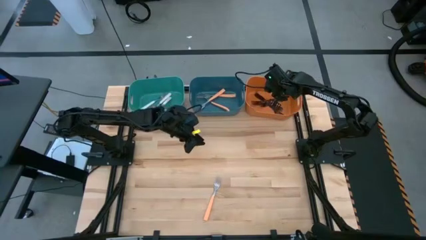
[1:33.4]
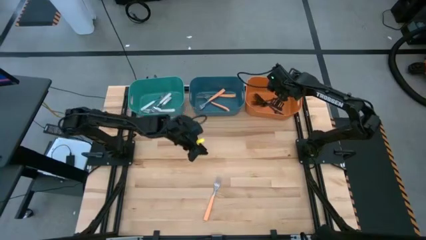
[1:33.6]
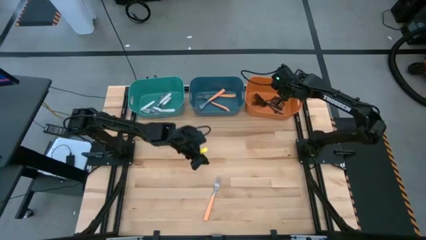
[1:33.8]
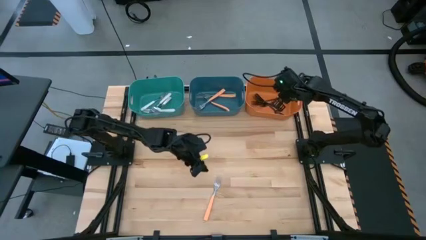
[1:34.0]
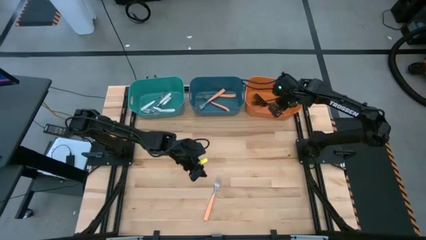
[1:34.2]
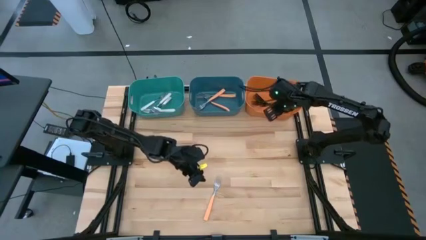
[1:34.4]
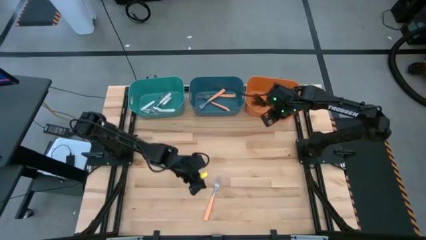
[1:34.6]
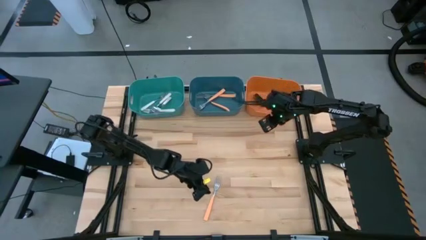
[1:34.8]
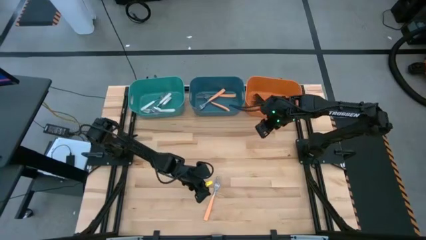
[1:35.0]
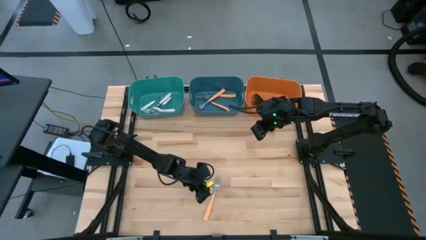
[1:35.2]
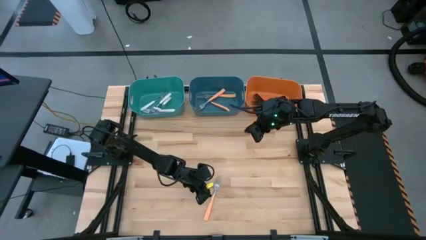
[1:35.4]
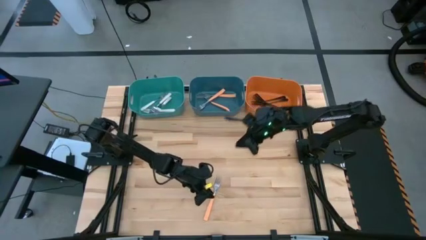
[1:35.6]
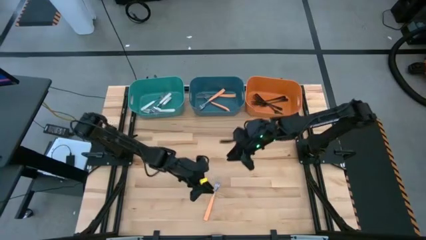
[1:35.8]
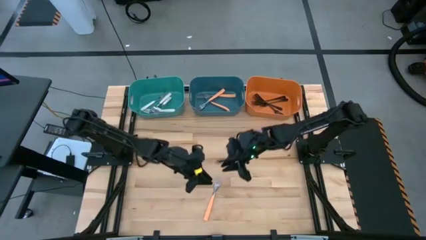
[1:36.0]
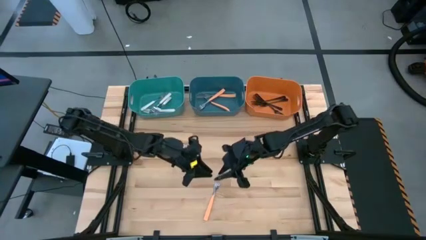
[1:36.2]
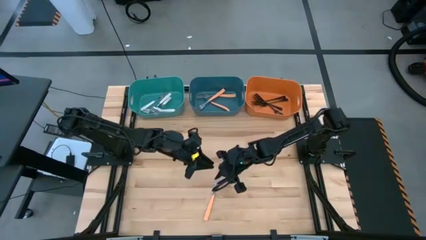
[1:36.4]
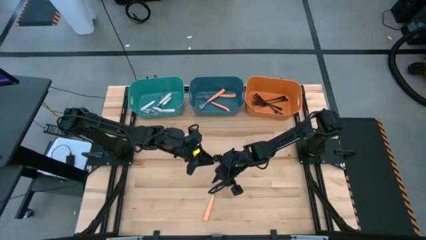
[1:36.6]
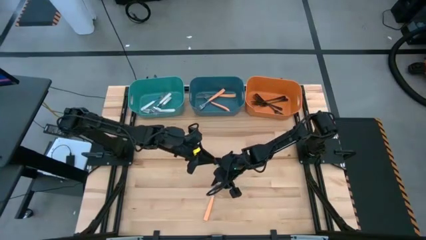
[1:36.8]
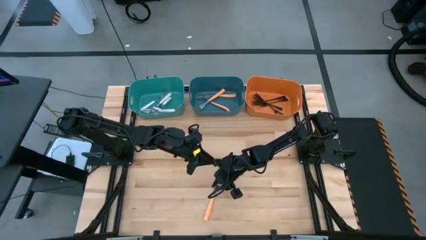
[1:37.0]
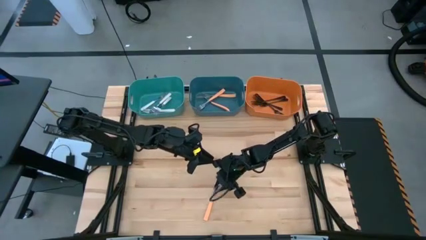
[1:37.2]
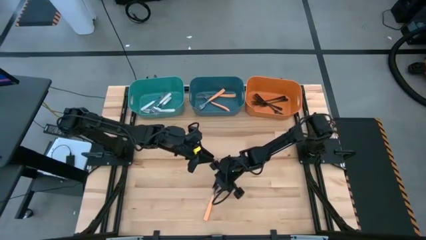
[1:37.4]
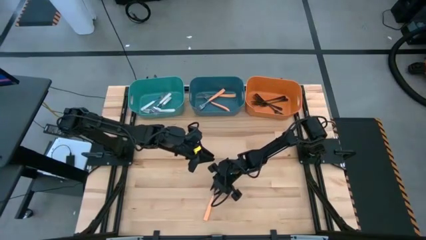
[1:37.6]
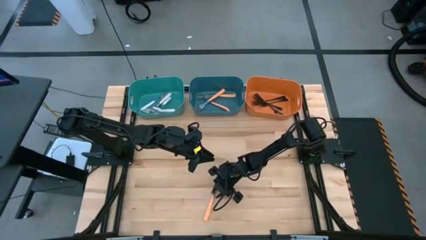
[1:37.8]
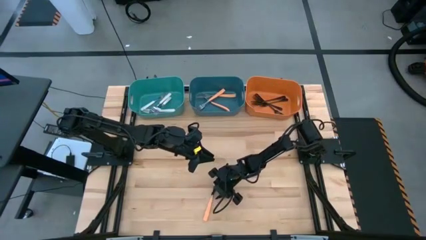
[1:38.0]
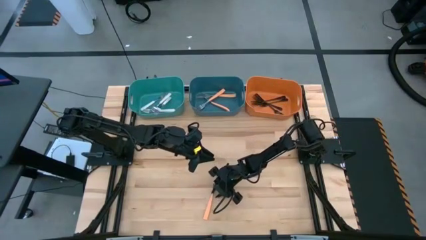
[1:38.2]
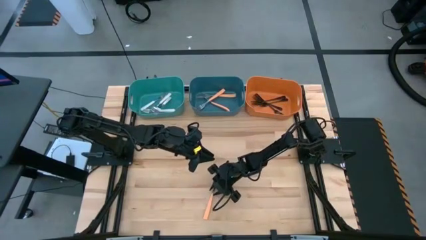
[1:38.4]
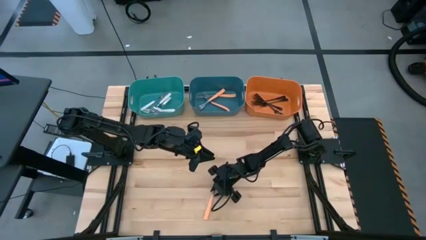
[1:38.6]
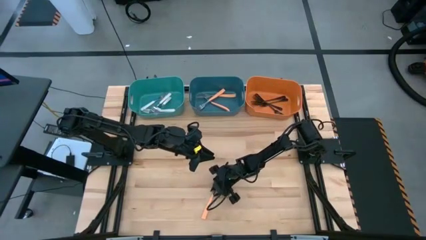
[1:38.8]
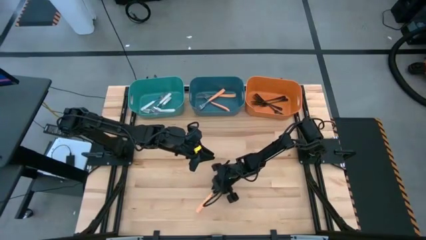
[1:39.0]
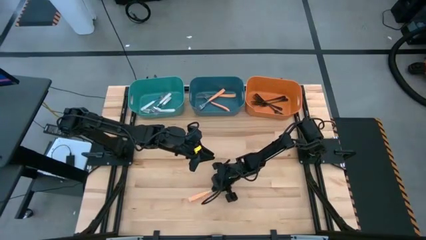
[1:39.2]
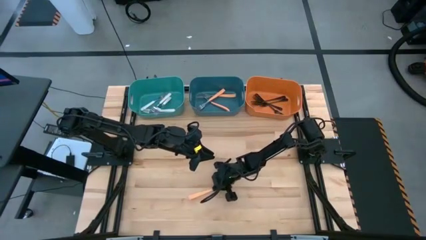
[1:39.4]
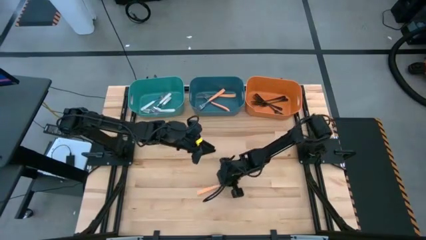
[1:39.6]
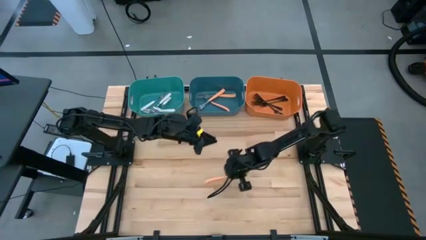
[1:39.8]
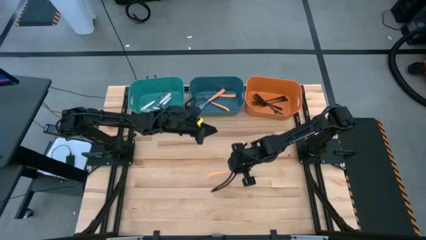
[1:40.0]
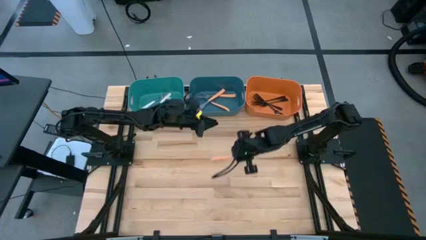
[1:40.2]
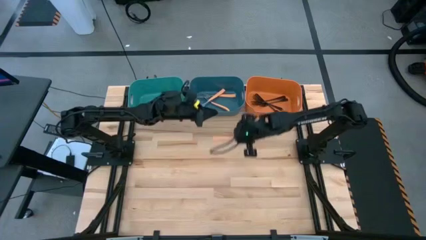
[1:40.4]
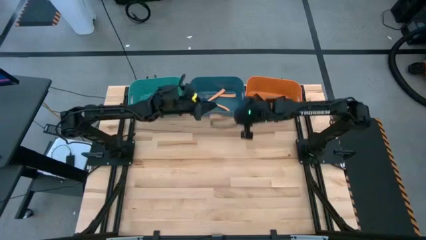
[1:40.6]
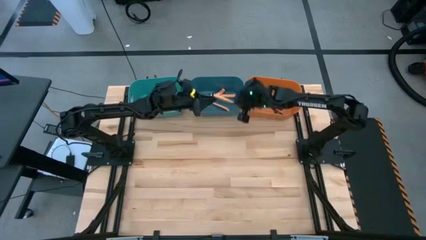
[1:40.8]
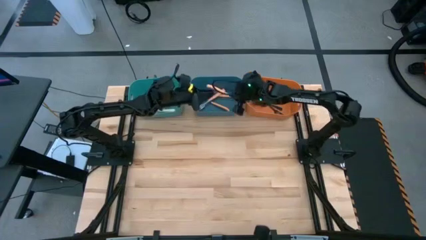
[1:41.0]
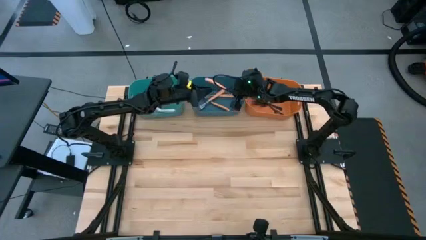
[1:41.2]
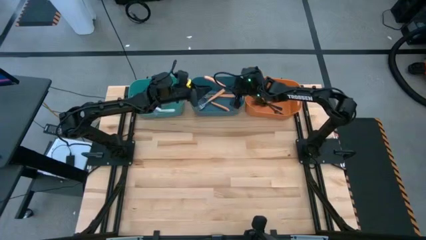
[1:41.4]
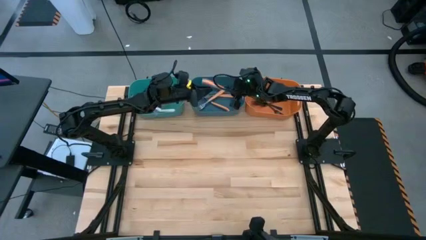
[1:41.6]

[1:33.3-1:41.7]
Task: Sort silverware by color (type)
Put the orange fork into the blue bin

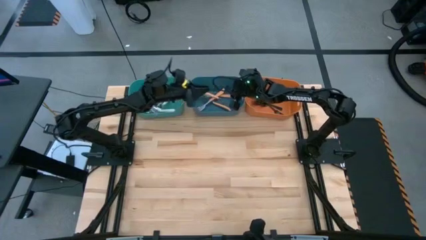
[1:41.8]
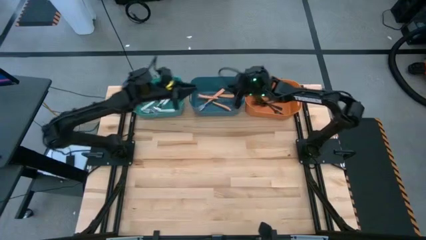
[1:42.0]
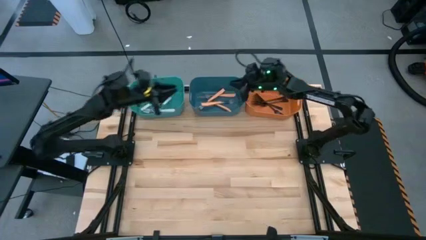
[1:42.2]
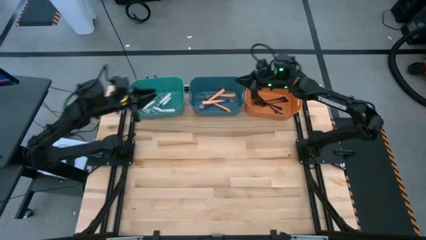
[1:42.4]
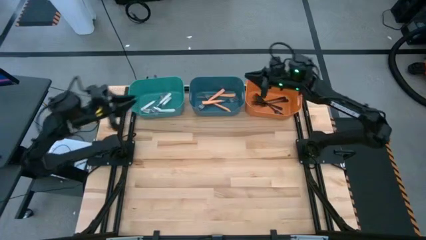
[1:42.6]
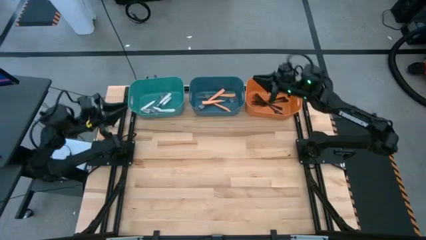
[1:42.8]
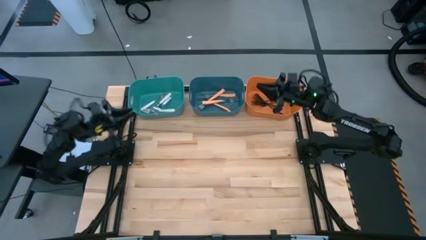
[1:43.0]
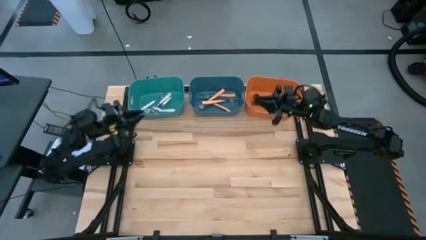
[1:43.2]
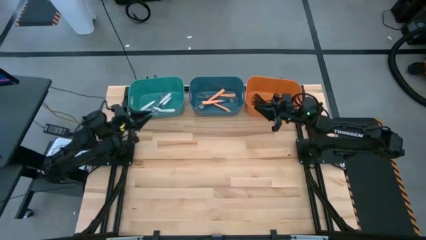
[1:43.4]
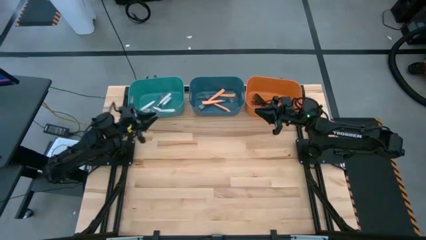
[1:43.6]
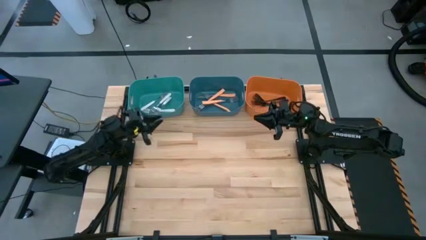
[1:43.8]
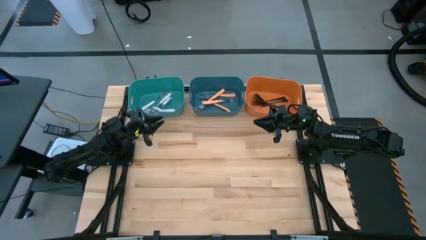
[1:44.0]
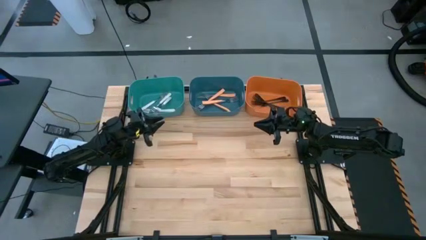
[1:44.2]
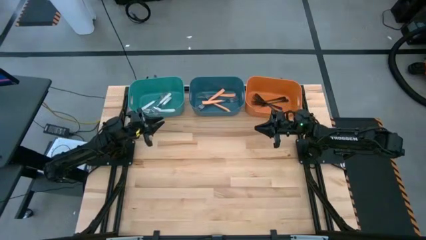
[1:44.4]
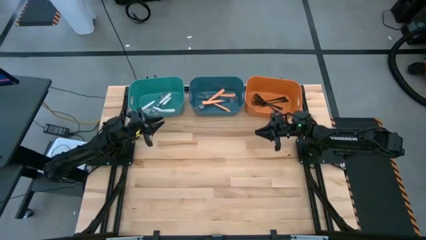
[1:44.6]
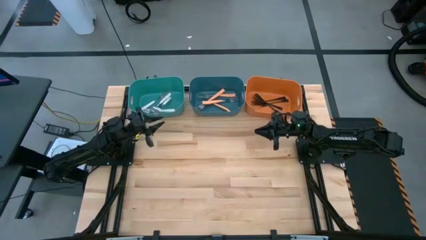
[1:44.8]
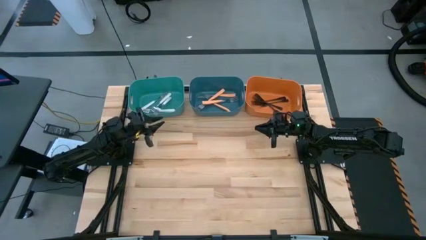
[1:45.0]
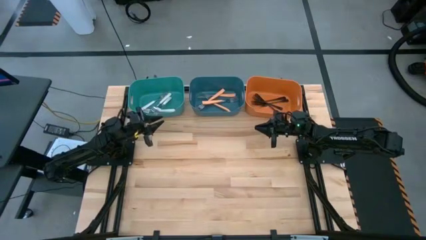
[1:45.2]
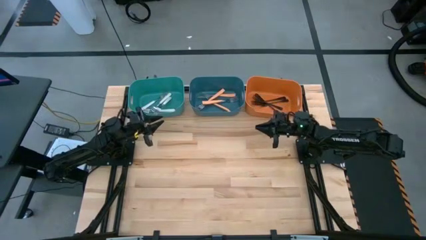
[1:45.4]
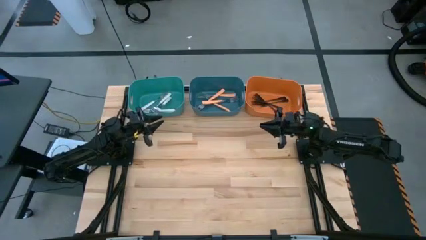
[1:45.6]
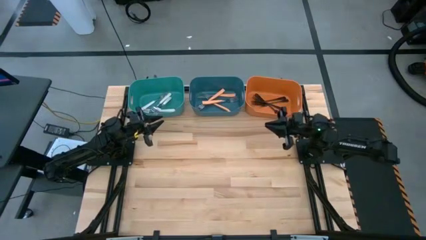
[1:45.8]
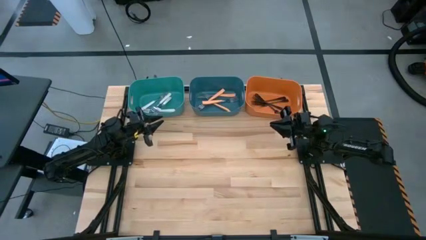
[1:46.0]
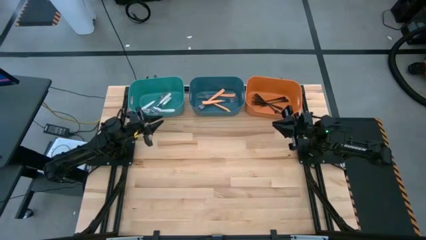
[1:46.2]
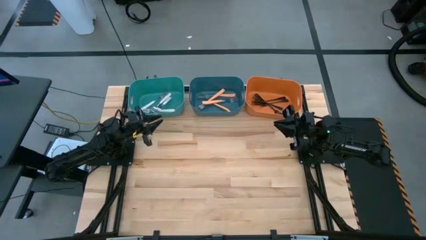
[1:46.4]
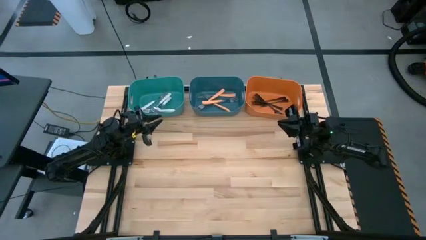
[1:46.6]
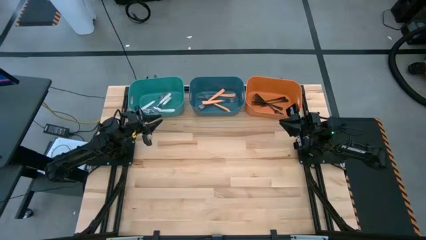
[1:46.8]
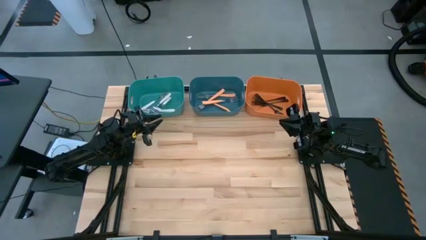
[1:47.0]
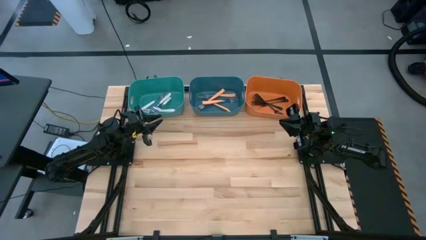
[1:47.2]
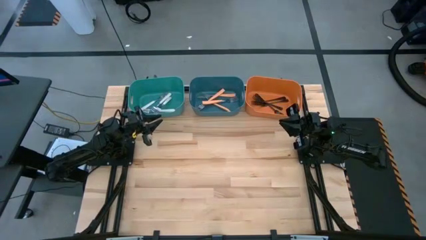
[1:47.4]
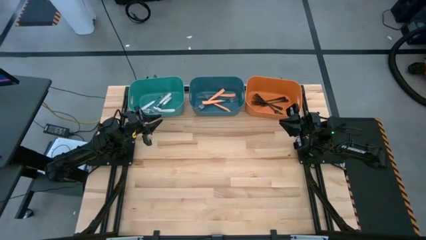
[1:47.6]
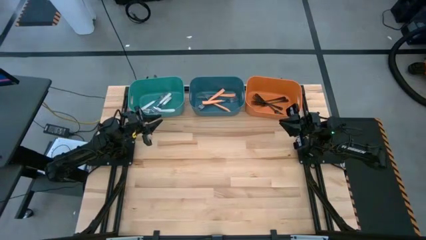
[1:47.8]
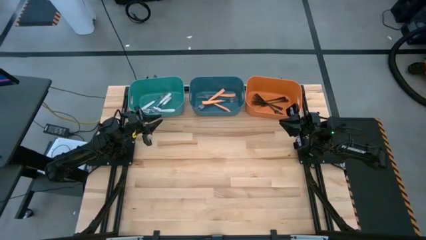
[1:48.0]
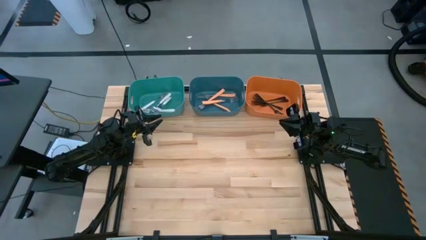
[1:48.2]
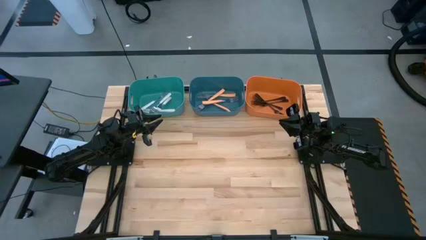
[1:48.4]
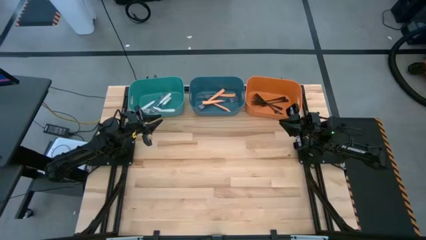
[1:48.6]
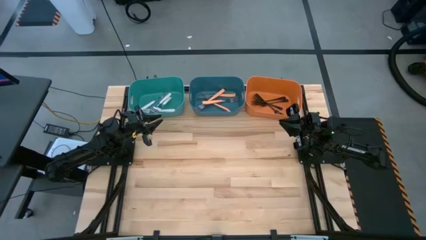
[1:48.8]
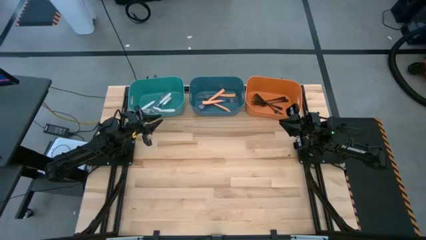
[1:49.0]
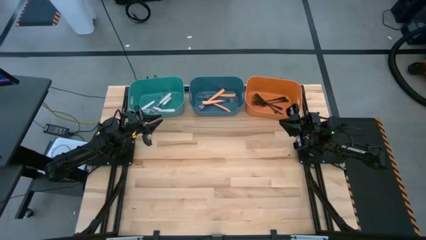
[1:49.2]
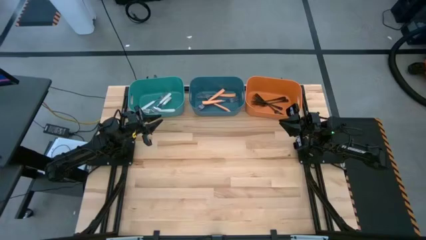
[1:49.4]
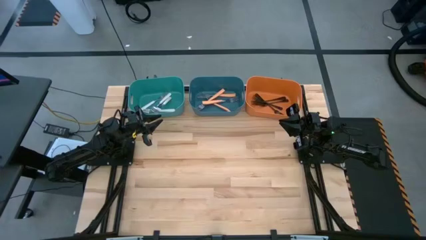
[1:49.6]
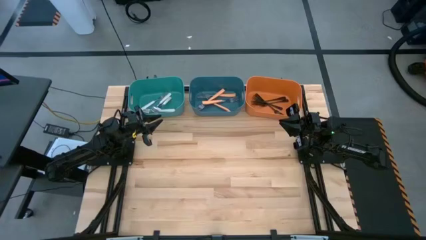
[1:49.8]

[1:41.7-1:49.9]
Return to Home Position
